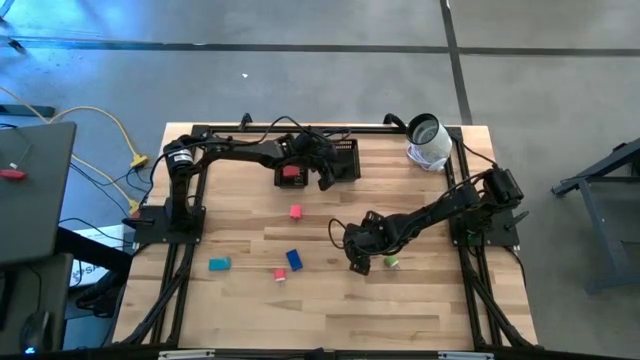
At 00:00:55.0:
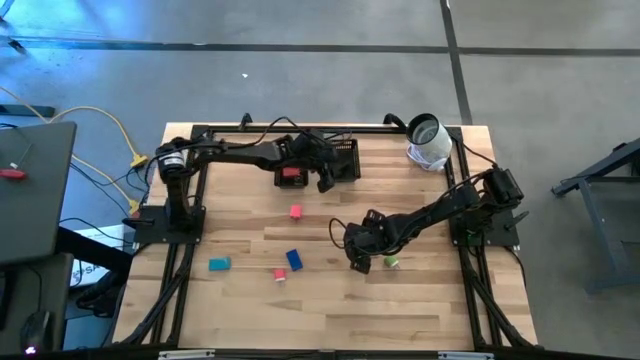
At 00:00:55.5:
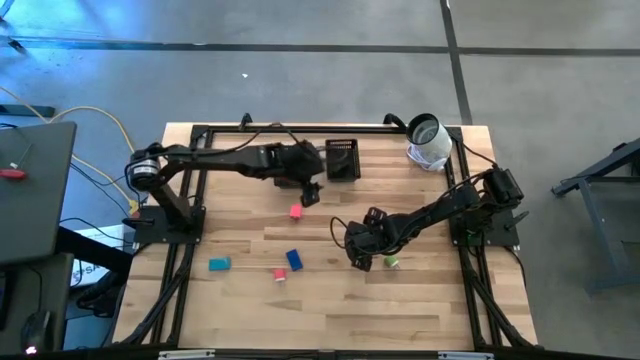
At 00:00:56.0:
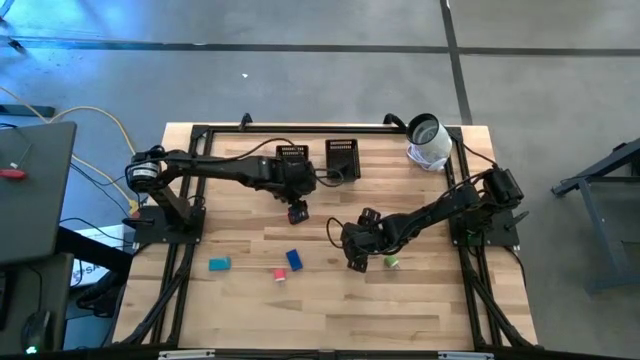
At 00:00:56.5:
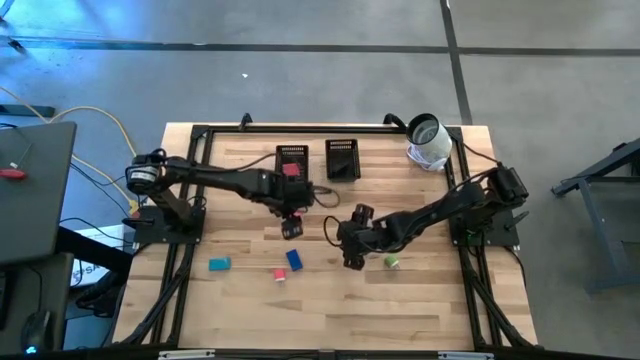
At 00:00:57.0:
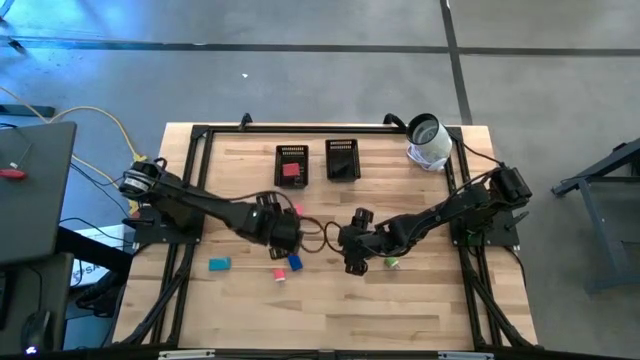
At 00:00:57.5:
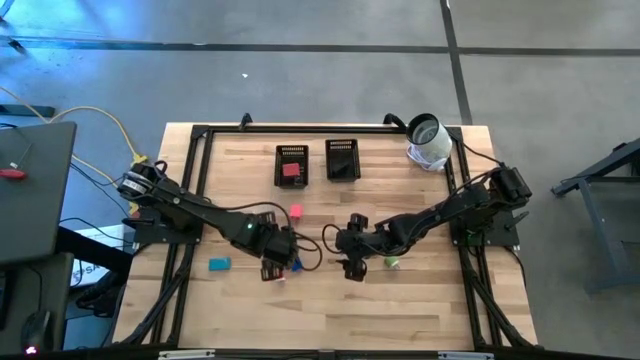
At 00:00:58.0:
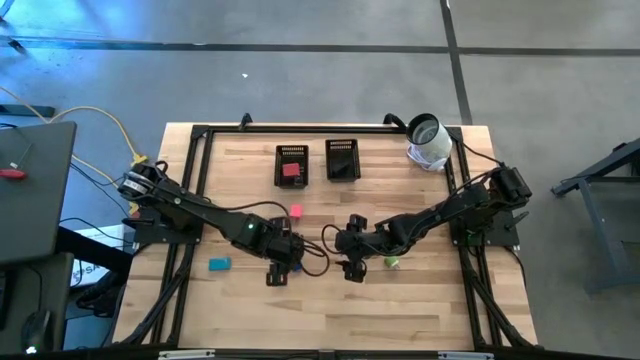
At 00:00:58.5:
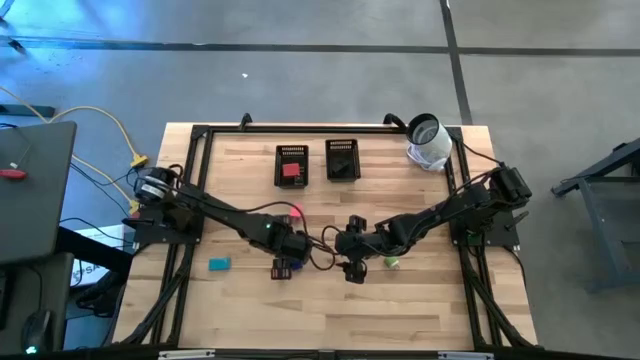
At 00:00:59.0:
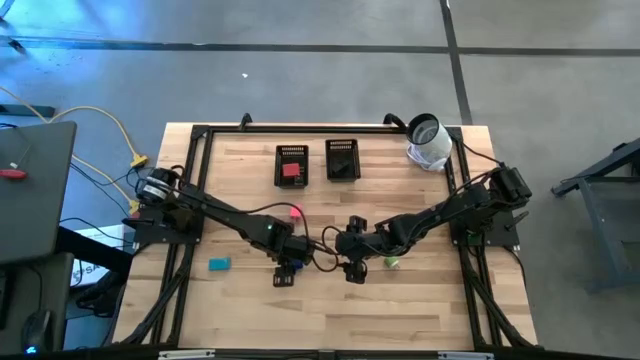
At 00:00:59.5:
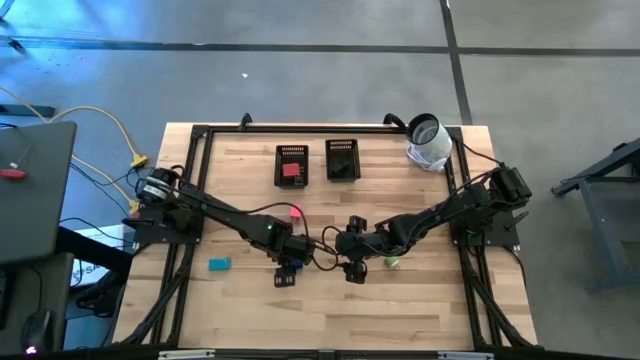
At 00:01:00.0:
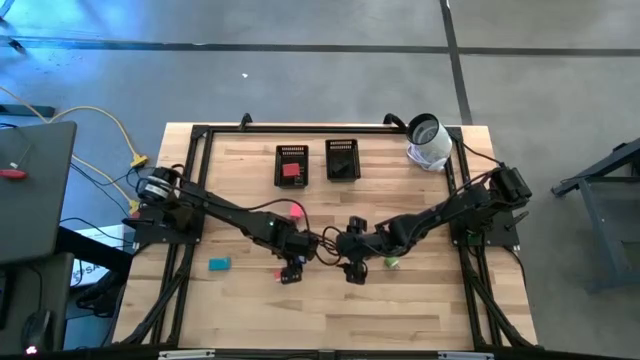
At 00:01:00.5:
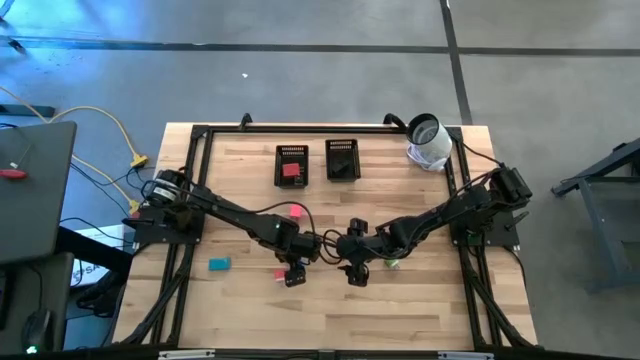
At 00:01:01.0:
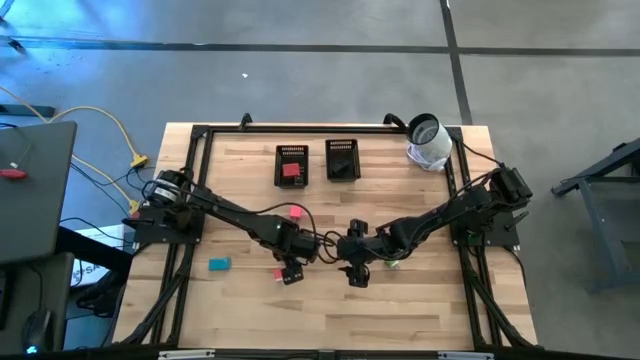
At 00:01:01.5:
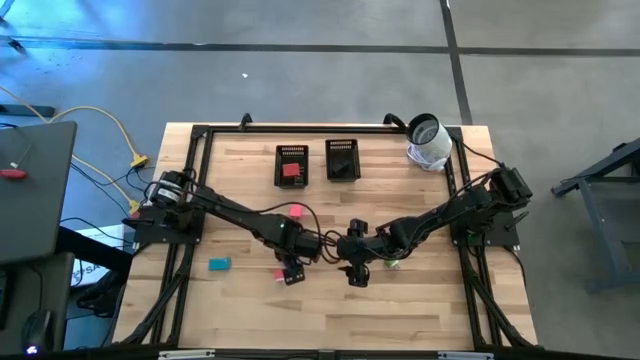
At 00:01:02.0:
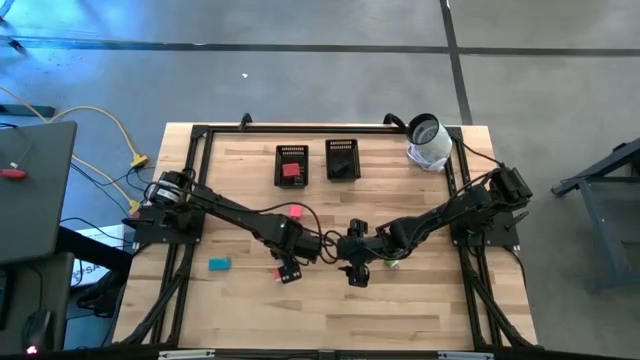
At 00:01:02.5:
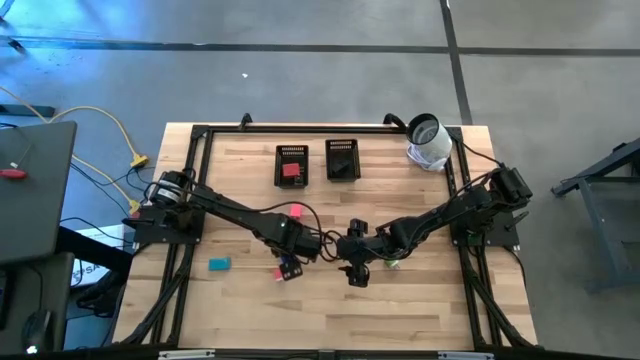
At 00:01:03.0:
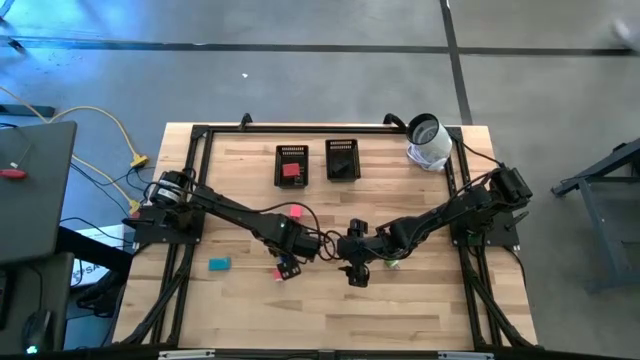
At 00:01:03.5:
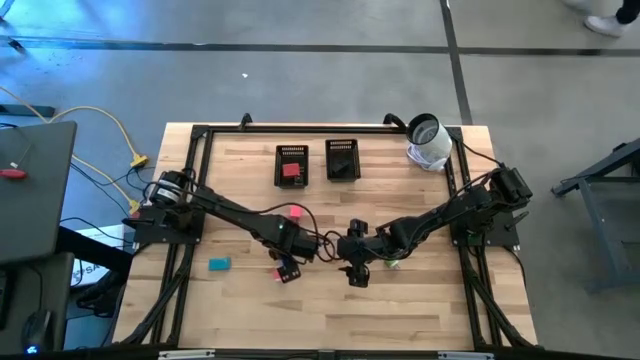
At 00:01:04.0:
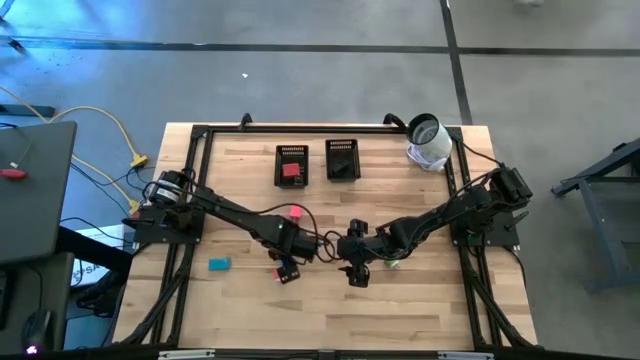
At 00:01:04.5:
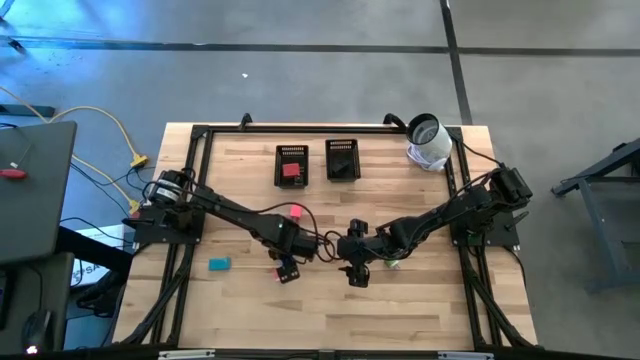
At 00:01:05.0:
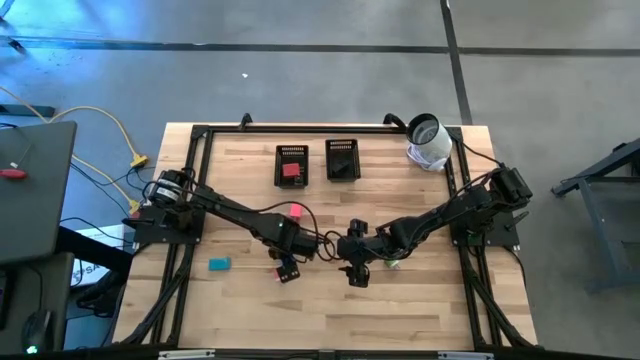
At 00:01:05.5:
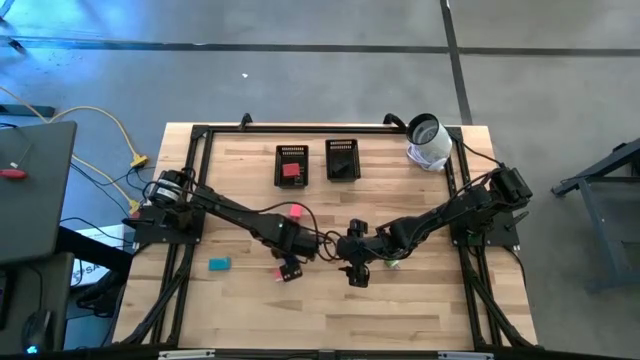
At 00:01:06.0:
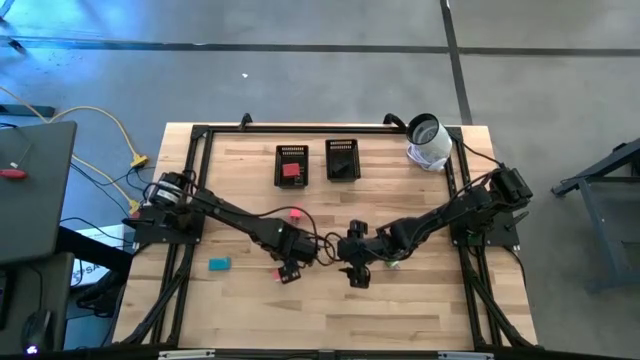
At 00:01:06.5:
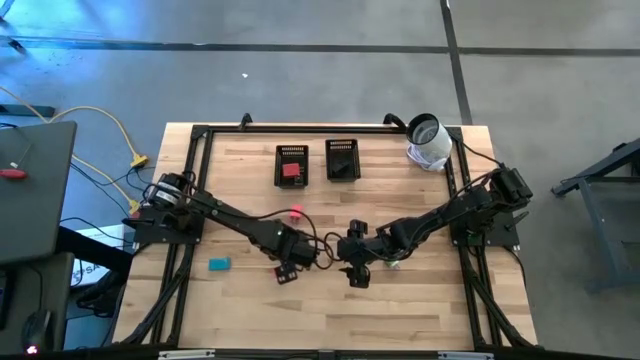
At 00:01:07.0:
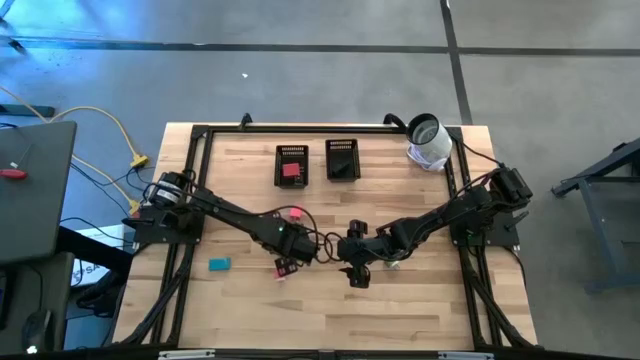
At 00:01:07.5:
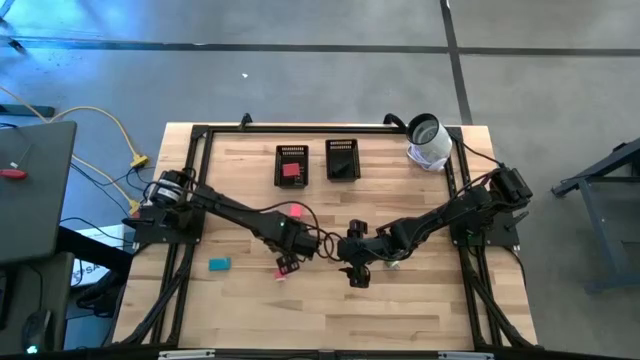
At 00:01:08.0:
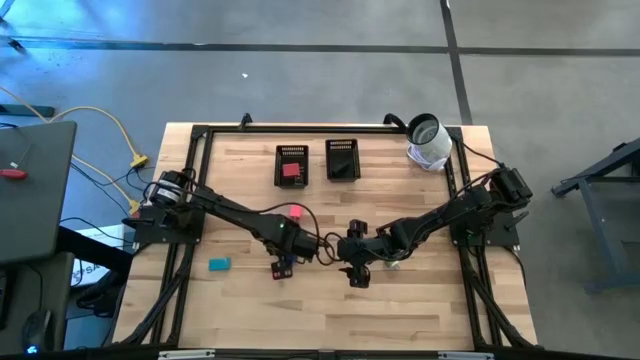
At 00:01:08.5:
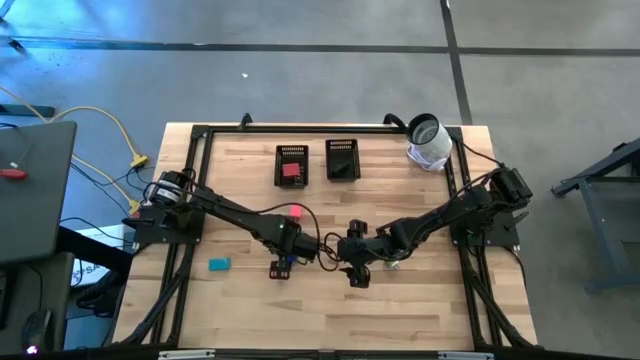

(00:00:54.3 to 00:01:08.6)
Task: Pick & Place Office items
Put the blue digital clock into the right black bin

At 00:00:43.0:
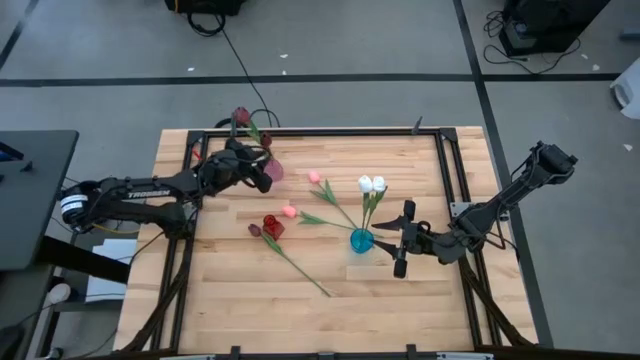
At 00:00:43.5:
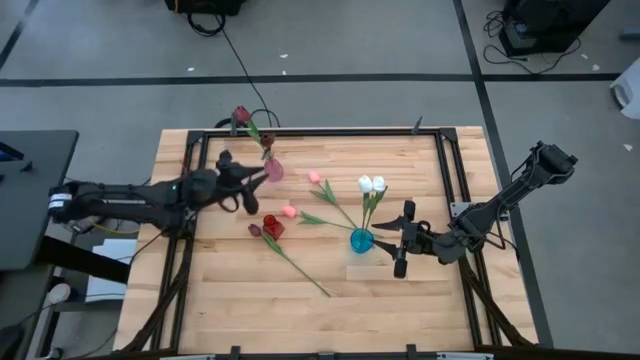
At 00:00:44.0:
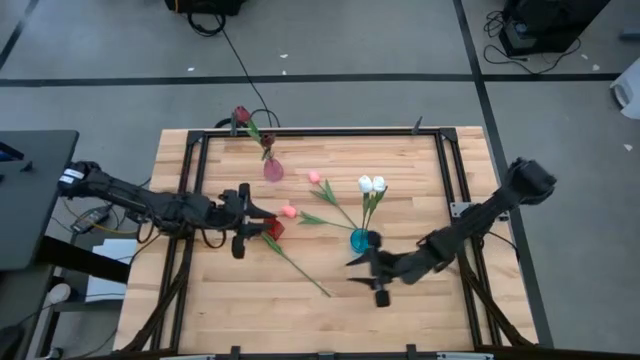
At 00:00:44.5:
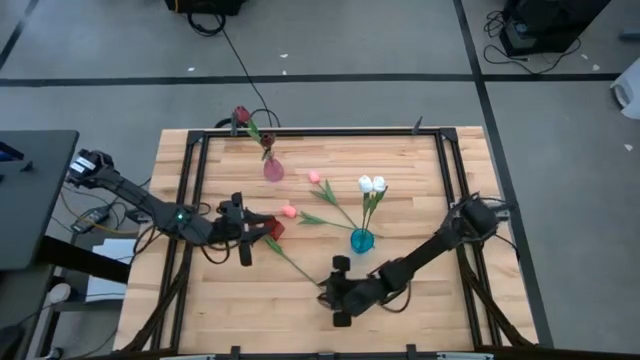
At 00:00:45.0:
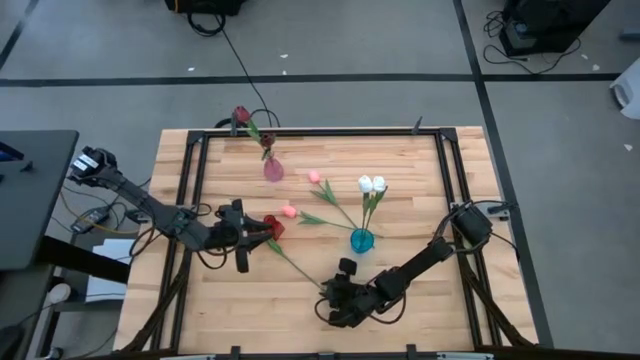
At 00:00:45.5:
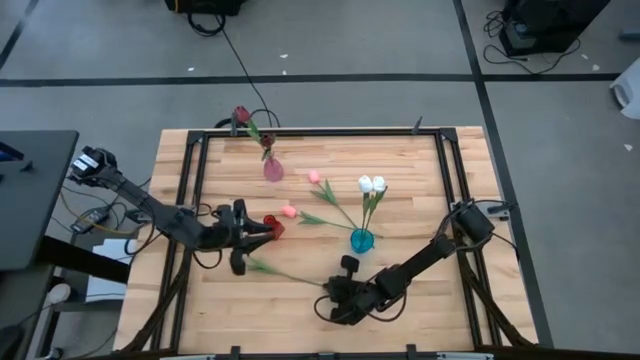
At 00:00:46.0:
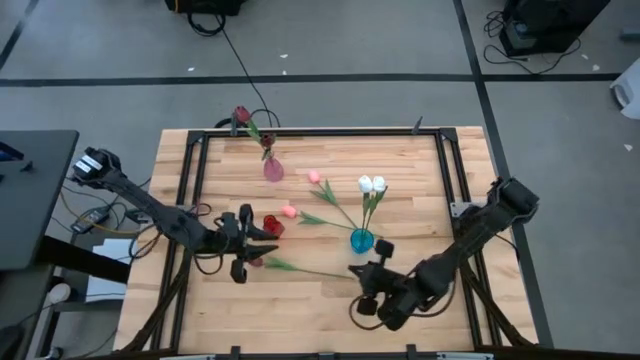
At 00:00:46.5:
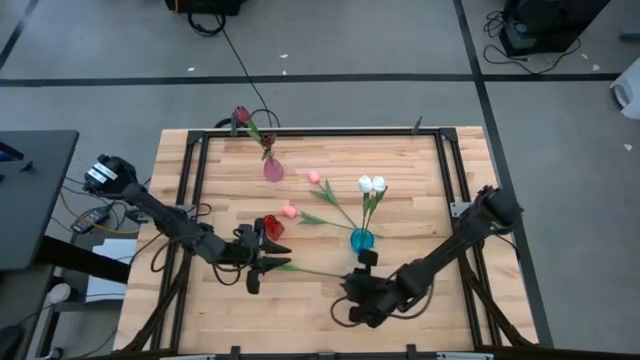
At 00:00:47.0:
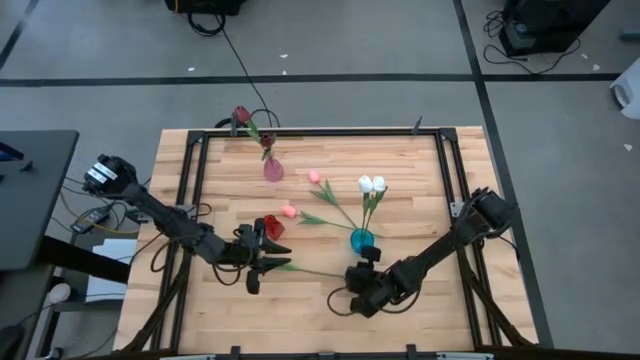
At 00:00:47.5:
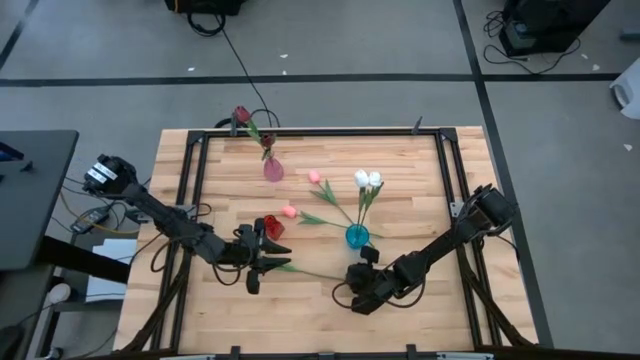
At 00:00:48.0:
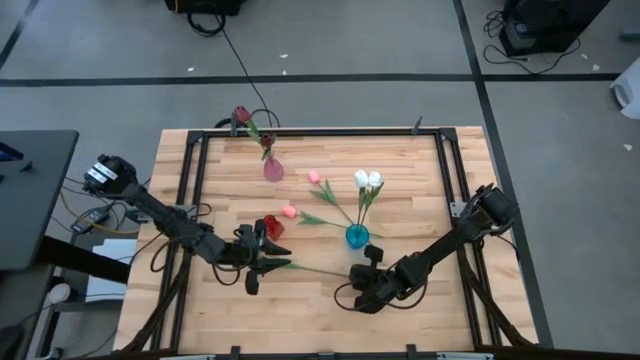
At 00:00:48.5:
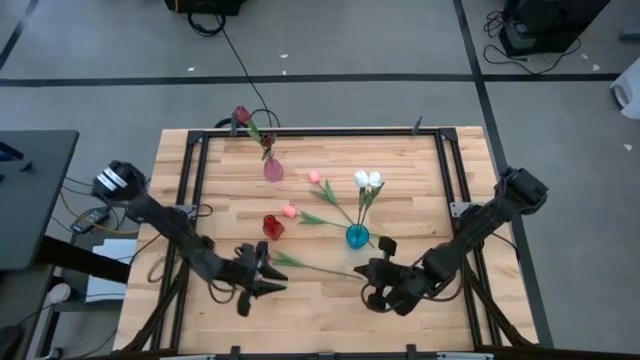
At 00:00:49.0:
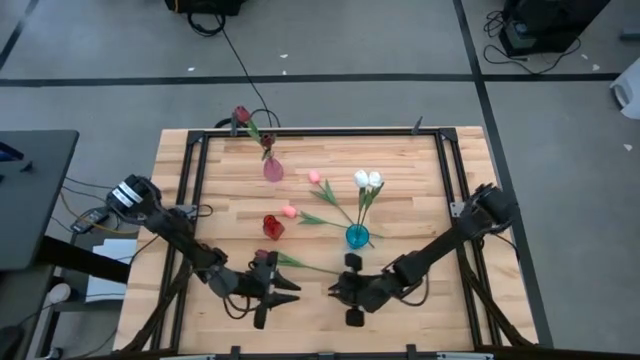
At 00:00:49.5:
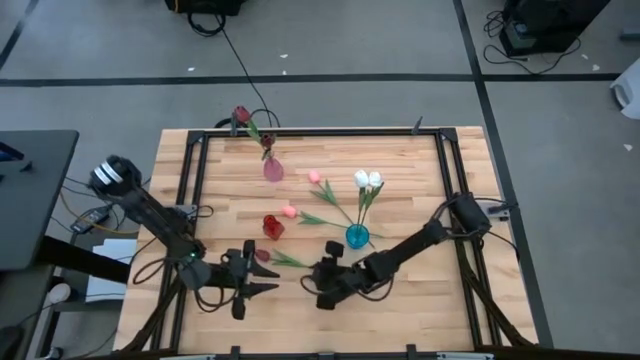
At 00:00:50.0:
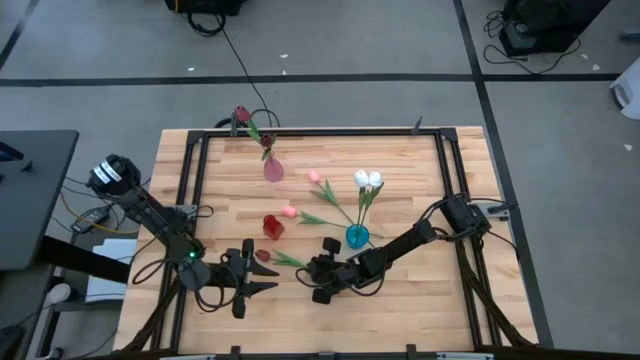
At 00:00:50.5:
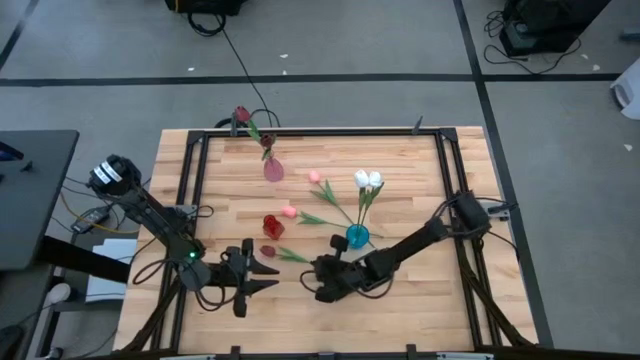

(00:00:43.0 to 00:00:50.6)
Task: Sort flowers into vase by color
Put the red tulip into the pink vase
